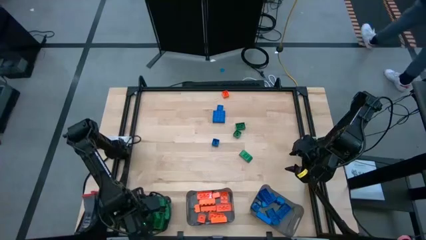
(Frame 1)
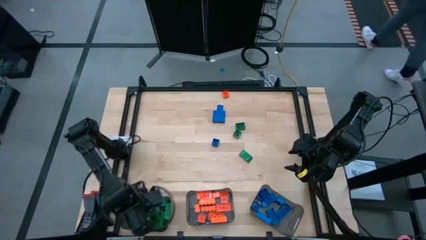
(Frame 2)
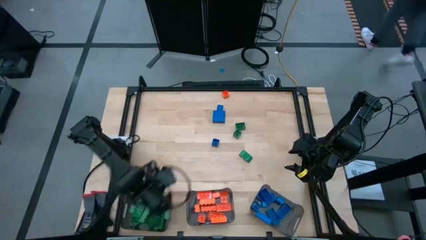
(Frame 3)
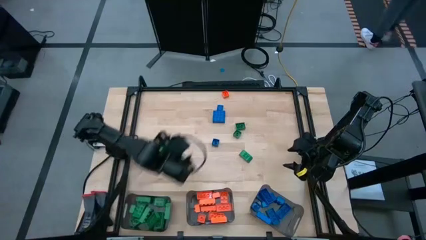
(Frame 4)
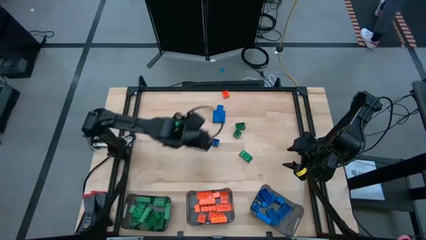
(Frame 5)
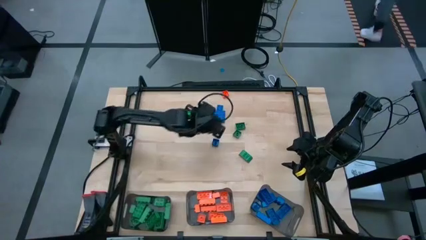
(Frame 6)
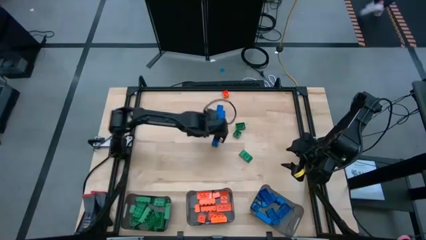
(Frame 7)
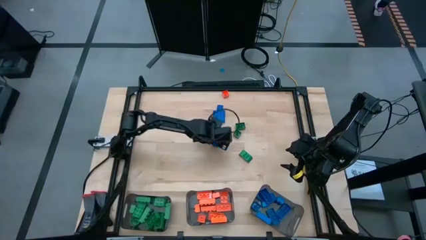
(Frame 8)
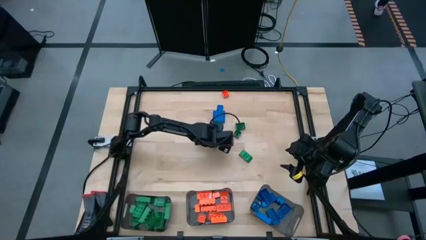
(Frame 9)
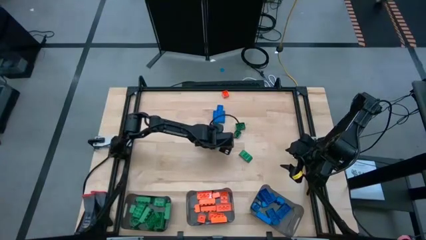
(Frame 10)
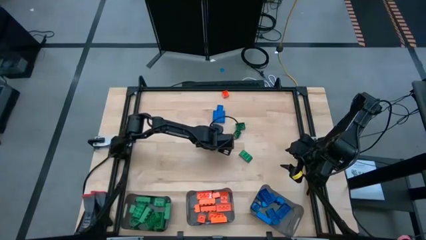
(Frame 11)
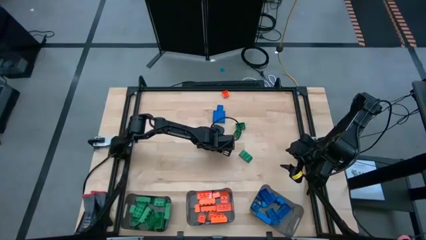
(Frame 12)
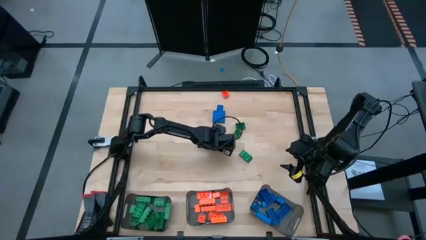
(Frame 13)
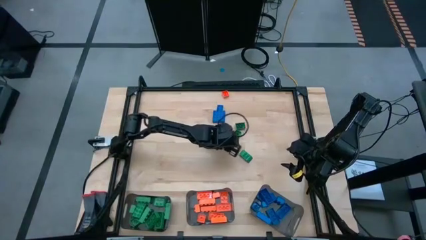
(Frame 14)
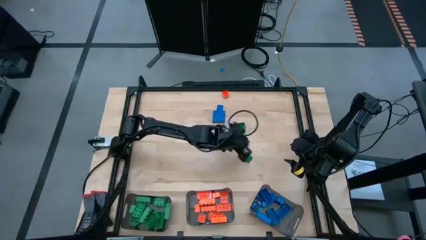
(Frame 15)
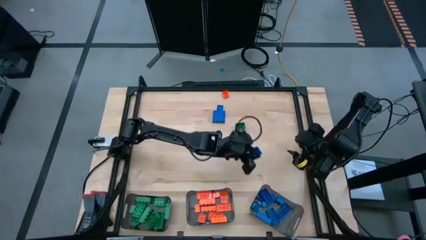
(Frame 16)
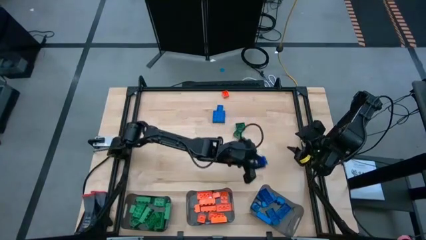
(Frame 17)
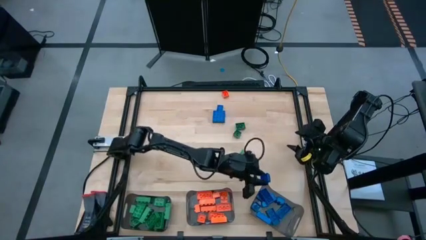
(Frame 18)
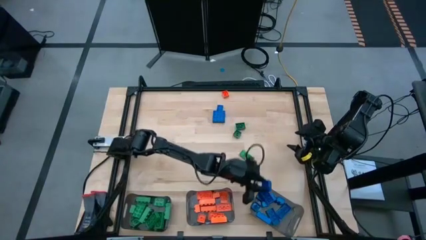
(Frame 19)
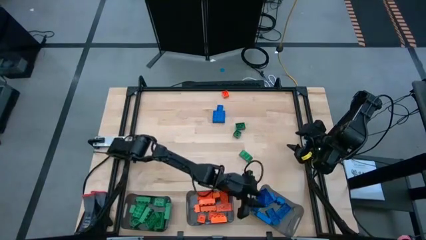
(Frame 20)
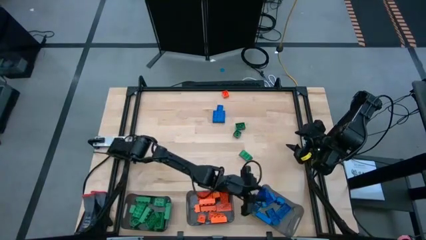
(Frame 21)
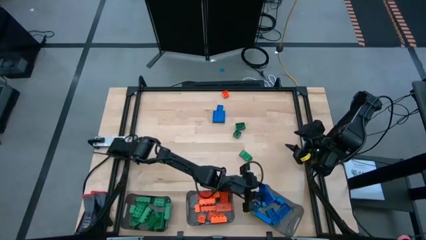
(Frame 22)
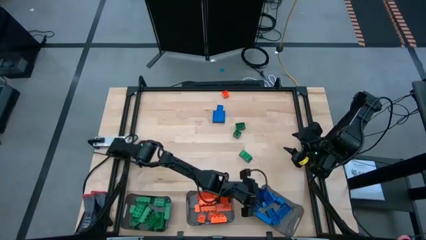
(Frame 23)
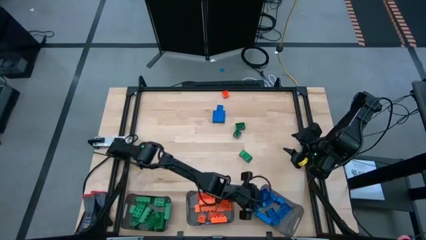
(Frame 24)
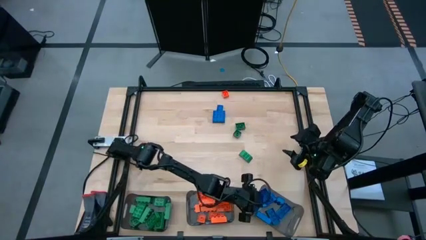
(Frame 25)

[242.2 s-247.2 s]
Task: Sort blocks
Put the blue game piece into the right black bin

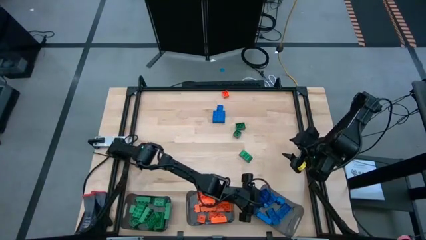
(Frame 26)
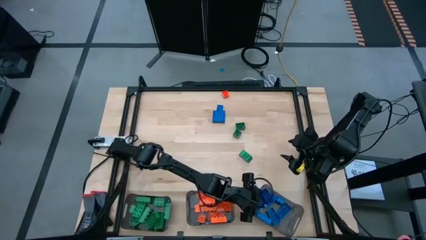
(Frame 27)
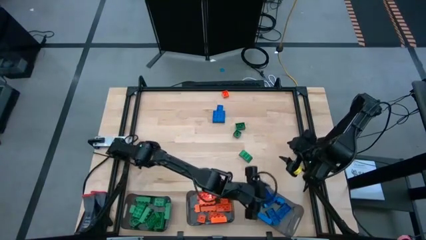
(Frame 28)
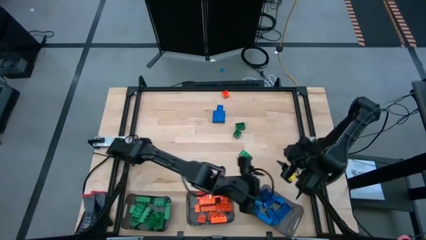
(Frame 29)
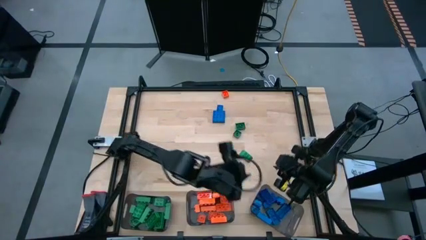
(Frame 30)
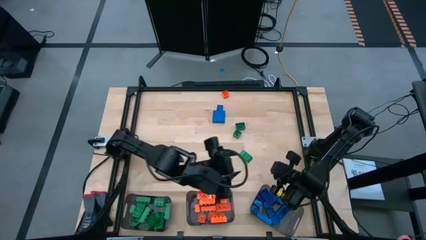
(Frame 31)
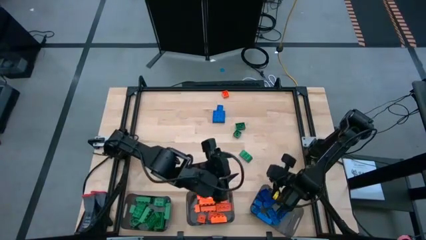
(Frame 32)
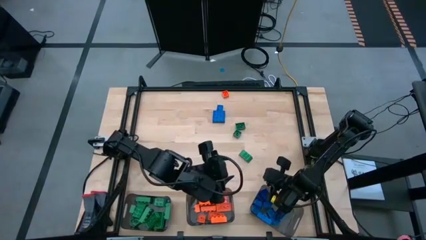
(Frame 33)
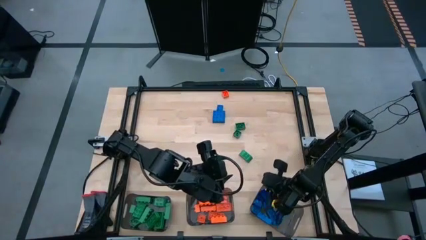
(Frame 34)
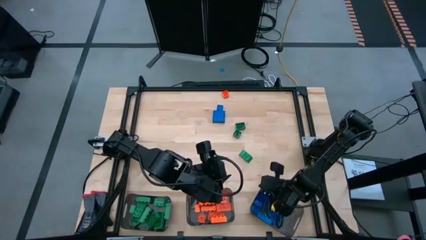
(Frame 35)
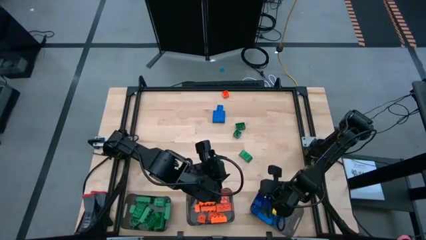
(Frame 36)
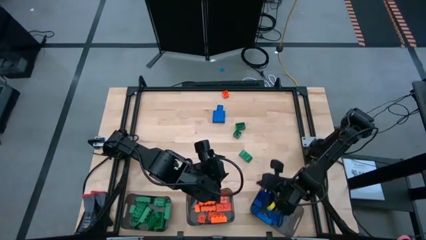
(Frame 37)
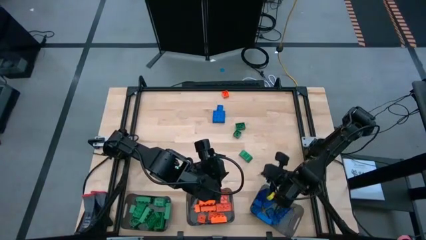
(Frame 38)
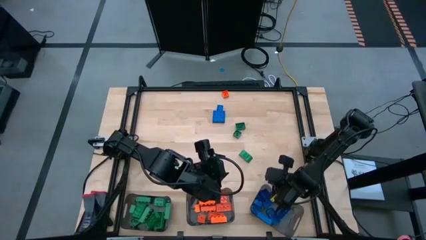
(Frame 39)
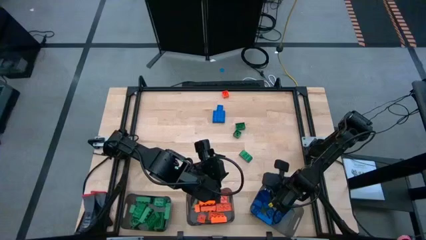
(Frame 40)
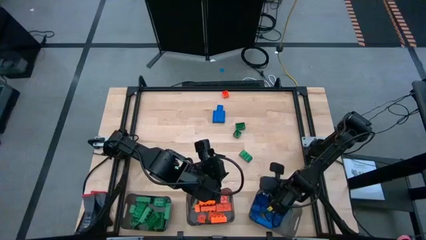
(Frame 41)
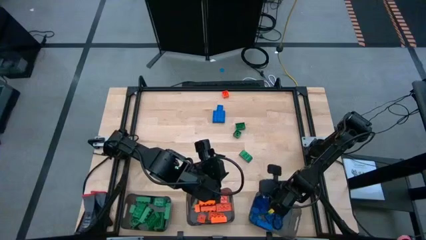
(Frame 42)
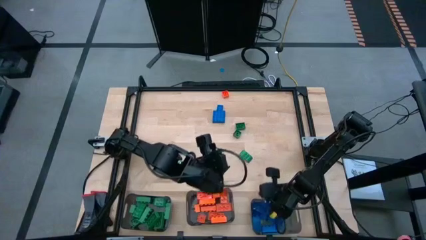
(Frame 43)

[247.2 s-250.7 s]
Adjust the right black bin

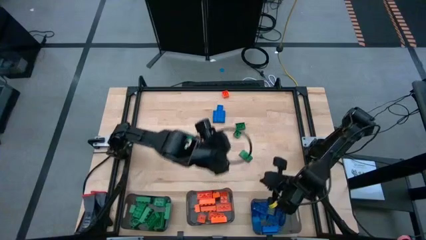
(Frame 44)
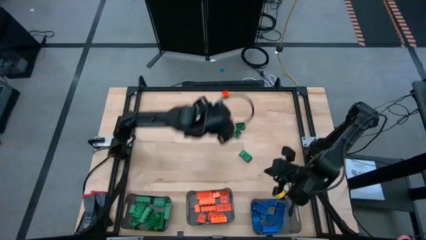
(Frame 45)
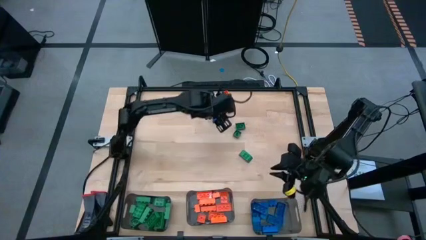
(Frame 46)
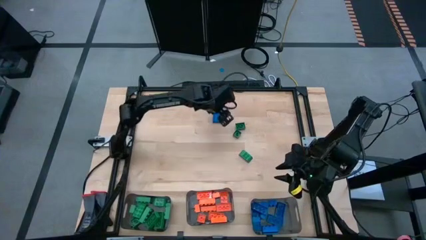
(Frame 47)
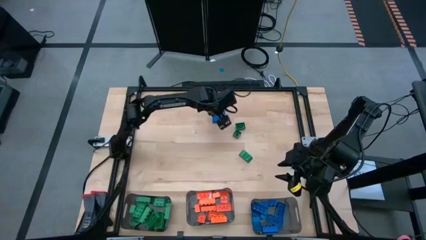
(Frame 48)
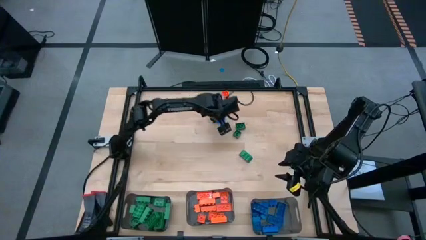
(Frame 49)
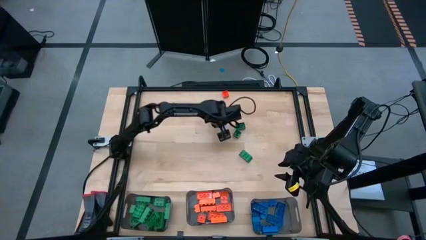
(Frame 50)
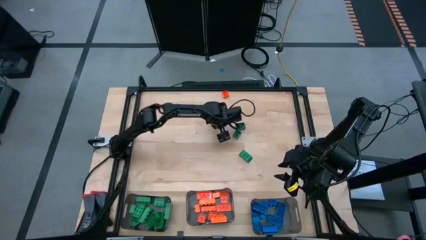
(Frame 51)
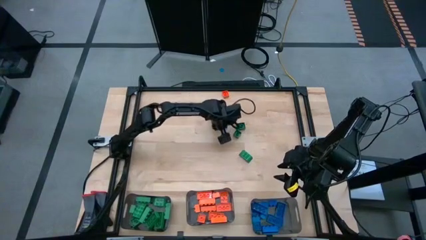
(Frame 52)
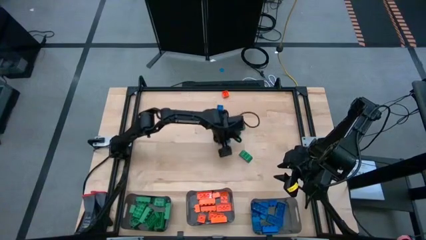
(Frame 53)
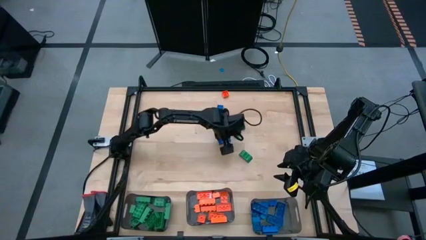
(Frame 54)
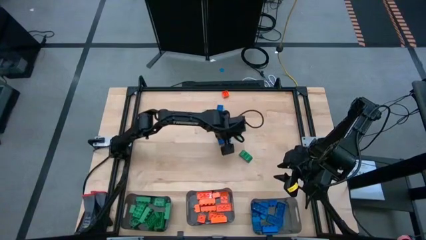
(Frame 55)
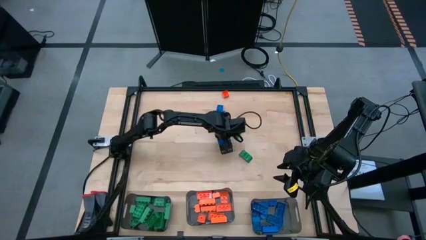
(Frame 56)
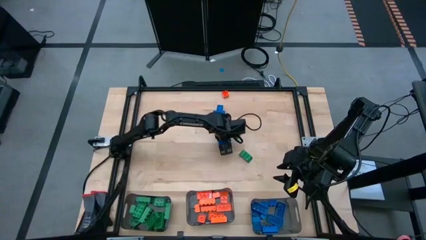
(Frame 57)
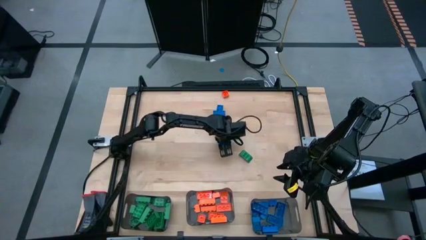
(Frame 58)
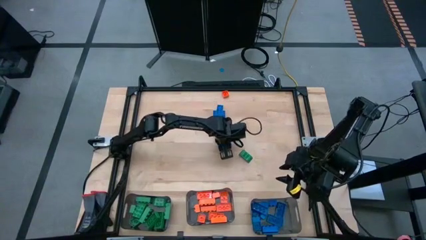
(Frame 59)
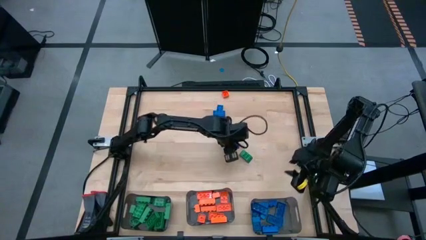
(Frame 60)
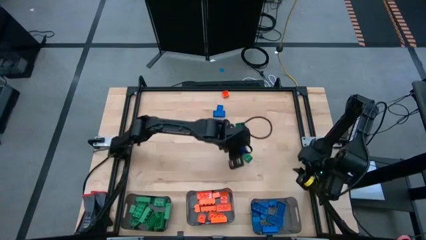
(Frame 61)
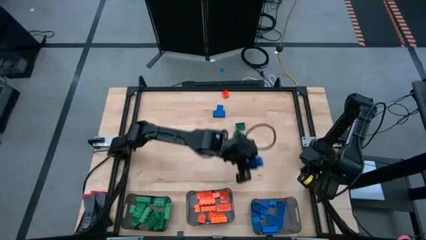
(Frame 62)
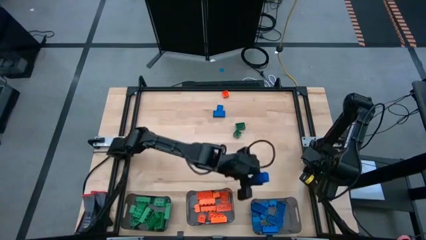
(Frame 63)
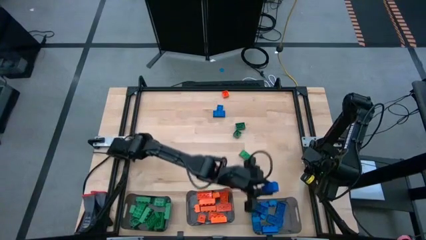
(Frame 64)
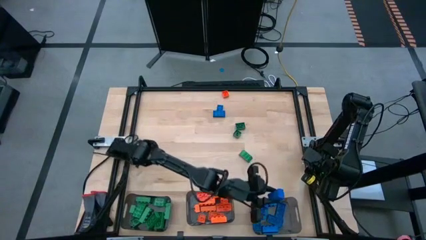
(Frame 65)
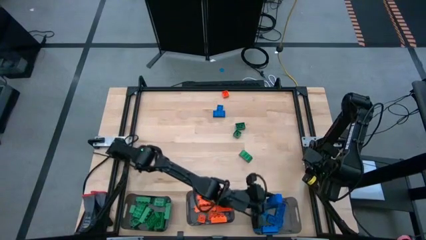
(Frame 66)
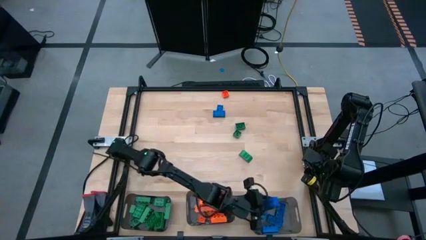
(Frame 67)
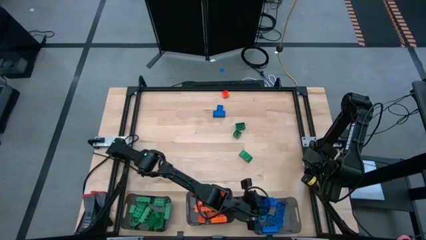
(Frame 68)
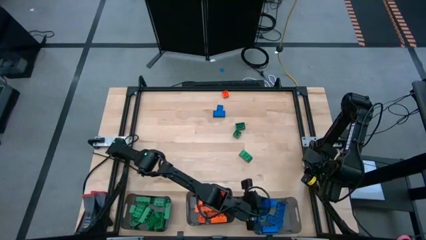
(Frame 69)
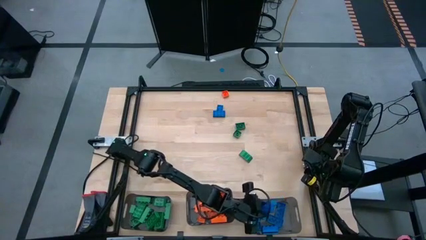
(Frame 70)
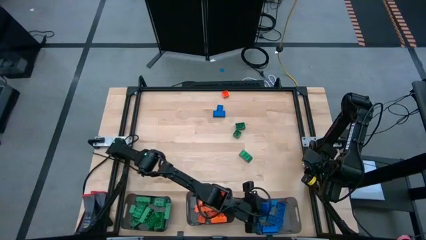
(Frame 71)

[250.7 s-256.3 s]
Put the blue game piece into the right black bin
